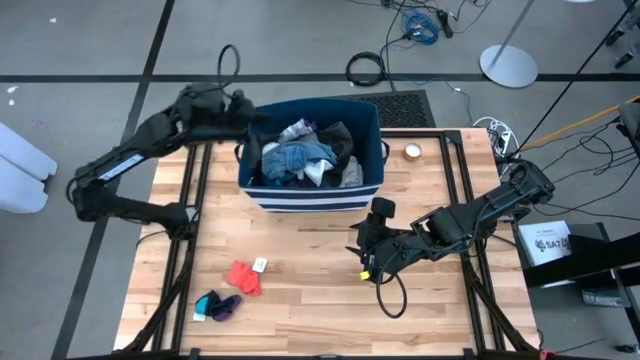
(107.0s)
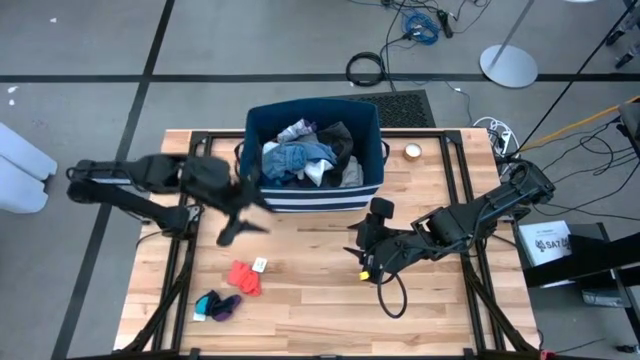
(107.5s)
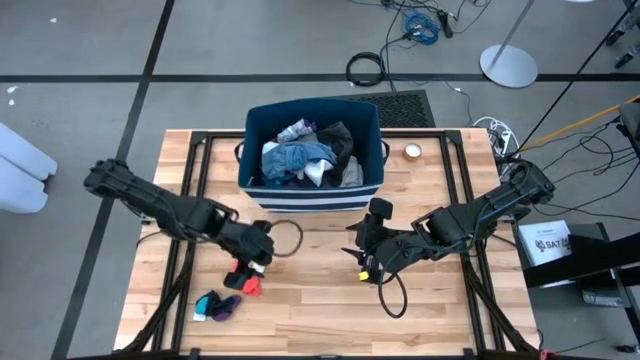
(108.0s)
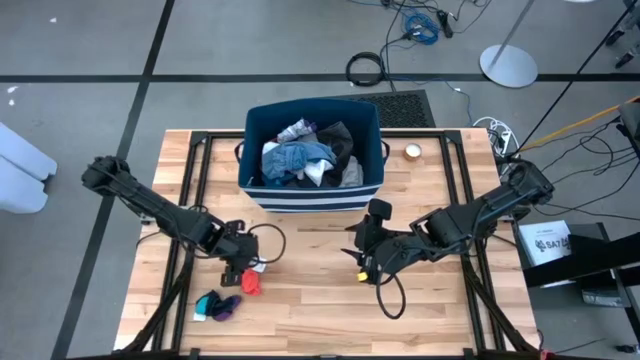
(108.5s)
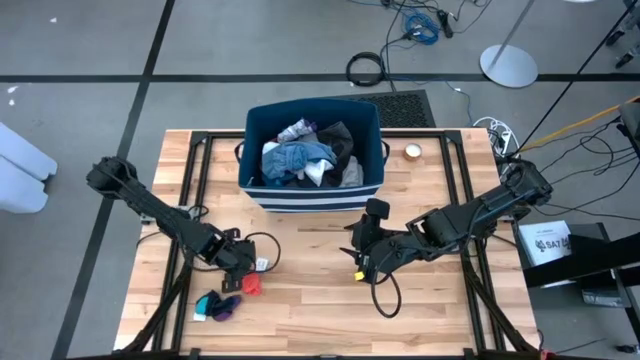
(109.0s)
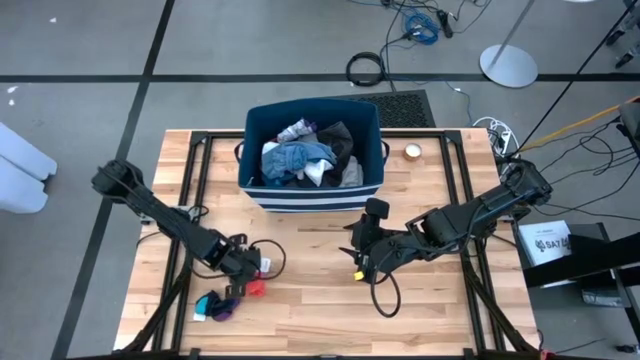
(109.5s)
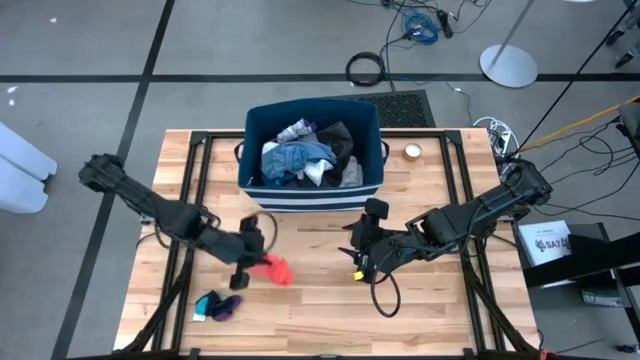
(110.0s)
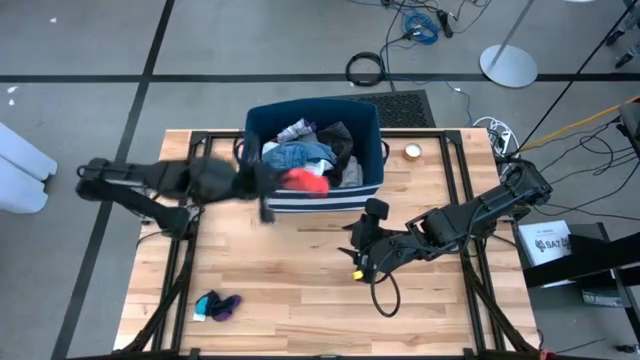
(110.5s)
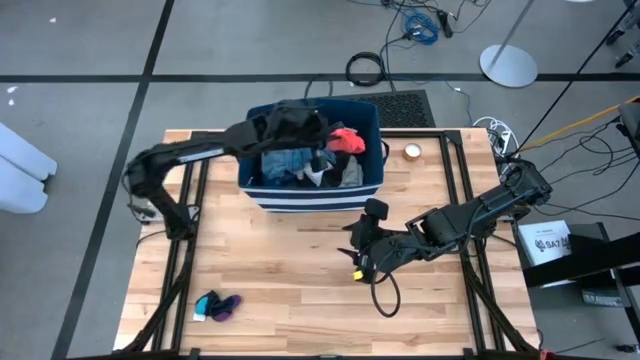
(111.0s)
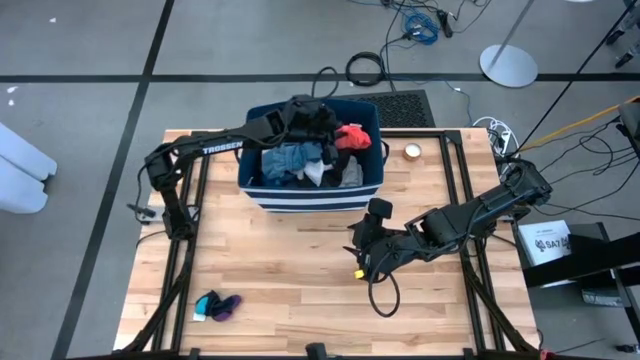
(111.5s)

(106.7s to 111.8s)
Task: Sort clothes
Put the orange sock into the blue bin

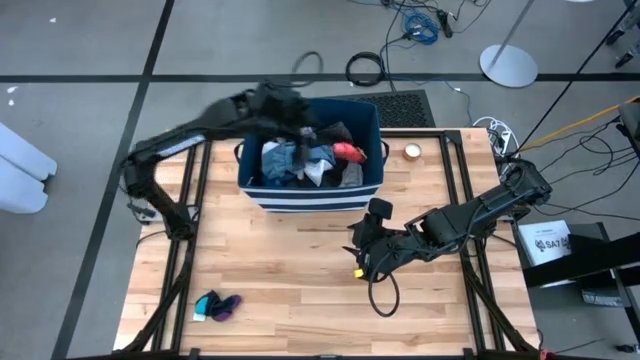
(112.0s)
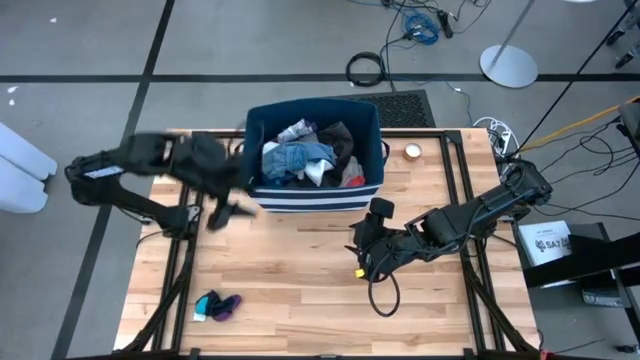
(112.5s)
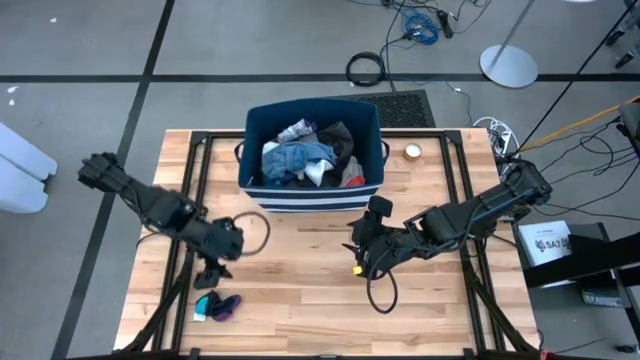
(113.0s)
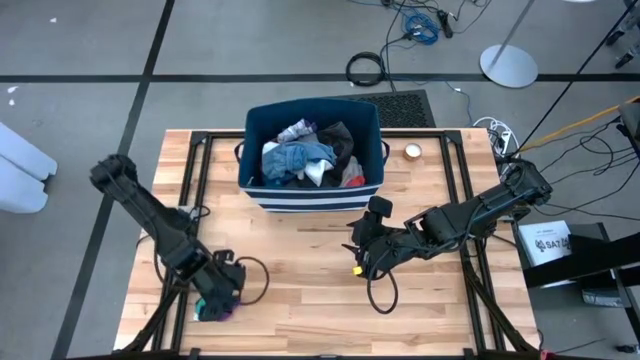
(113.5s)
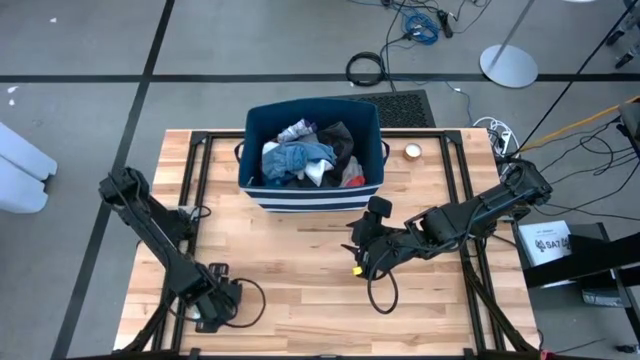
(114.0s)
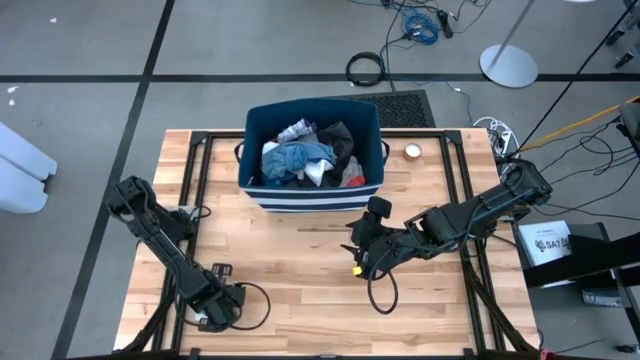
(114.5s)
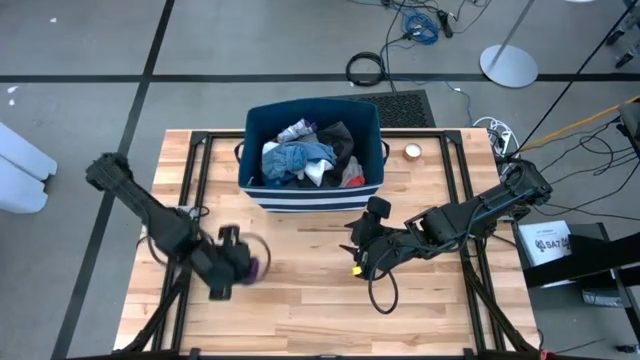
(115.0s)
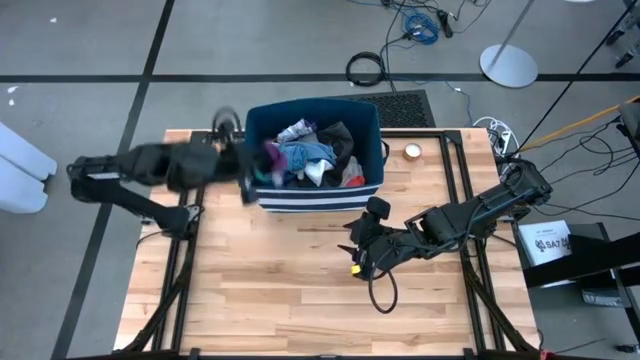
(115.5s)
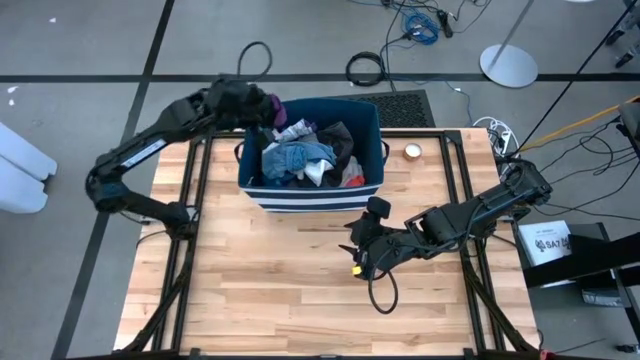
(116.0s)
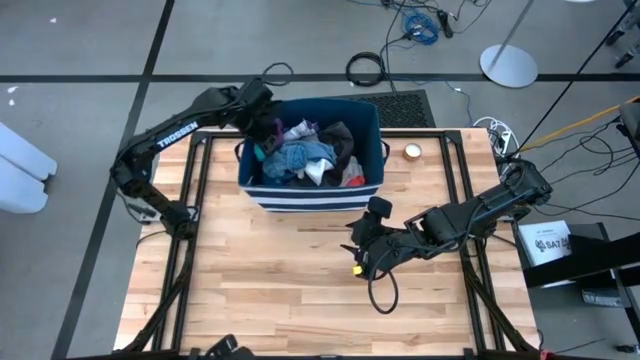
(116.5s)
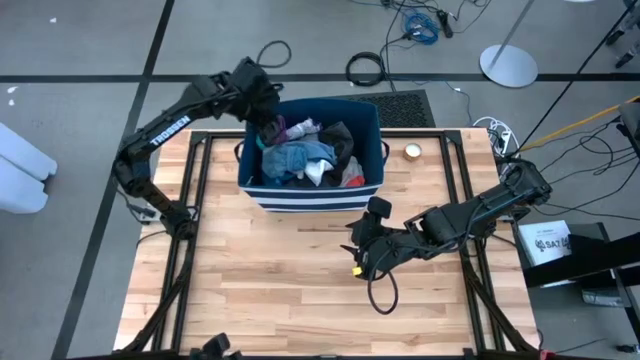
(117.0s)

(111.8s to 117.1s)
Put the black sock into the blue bin

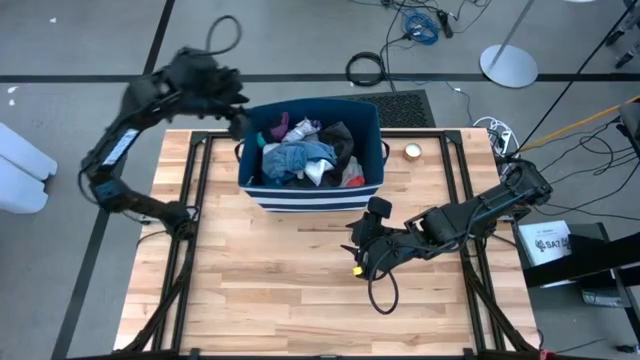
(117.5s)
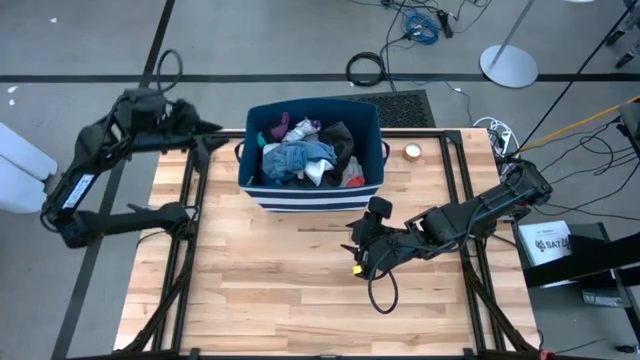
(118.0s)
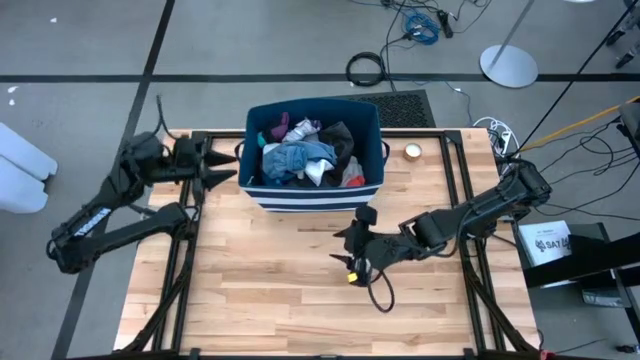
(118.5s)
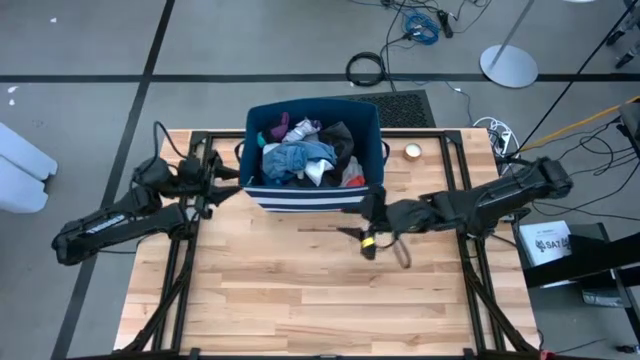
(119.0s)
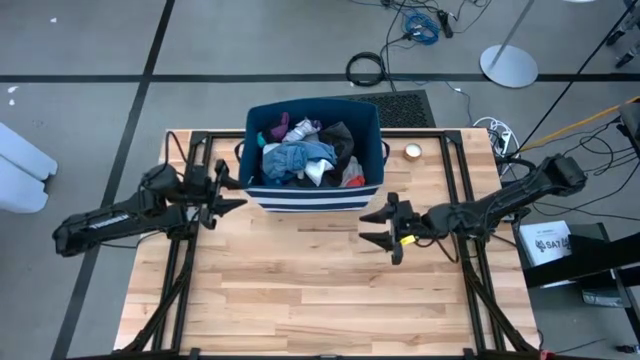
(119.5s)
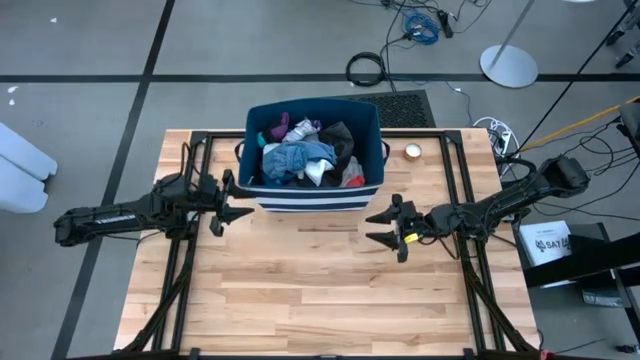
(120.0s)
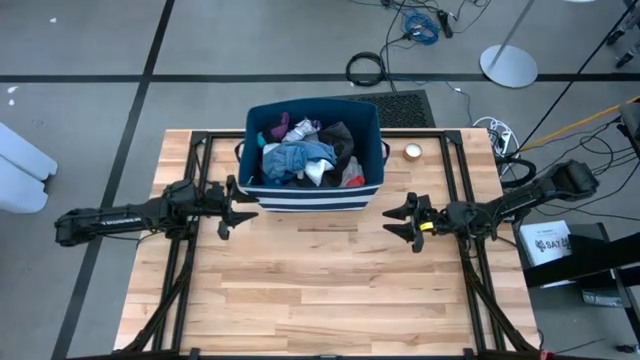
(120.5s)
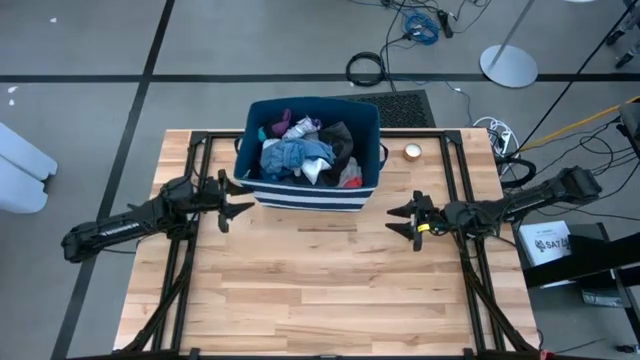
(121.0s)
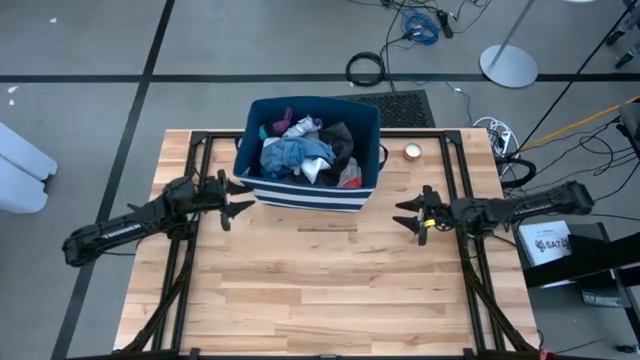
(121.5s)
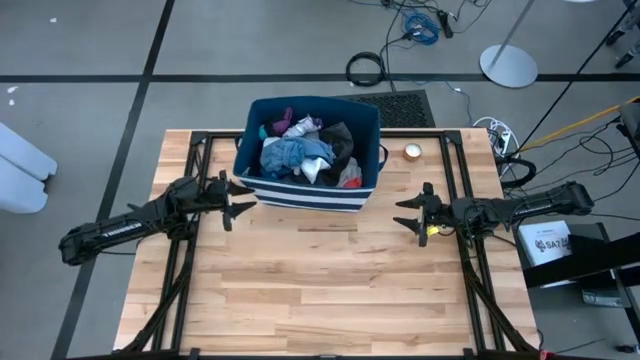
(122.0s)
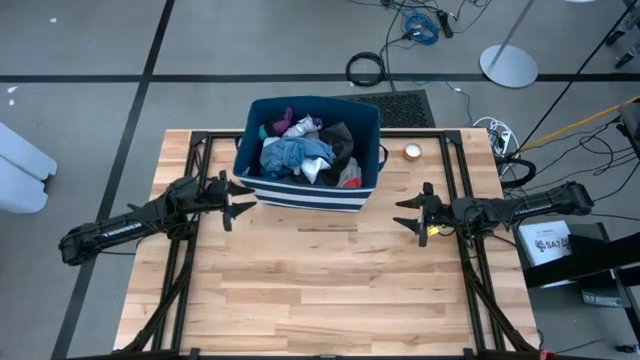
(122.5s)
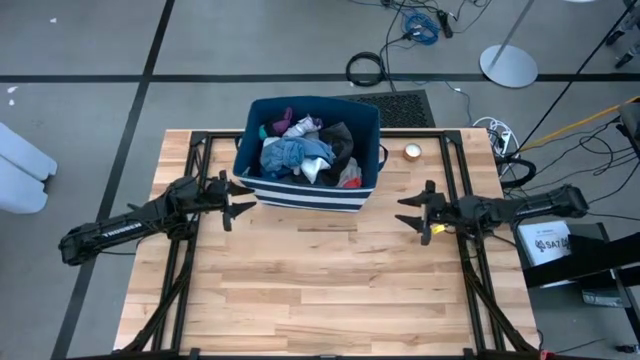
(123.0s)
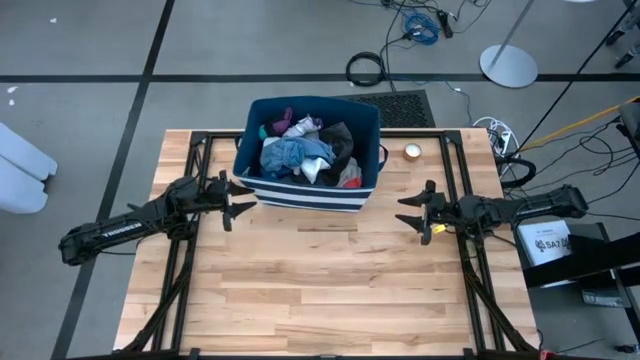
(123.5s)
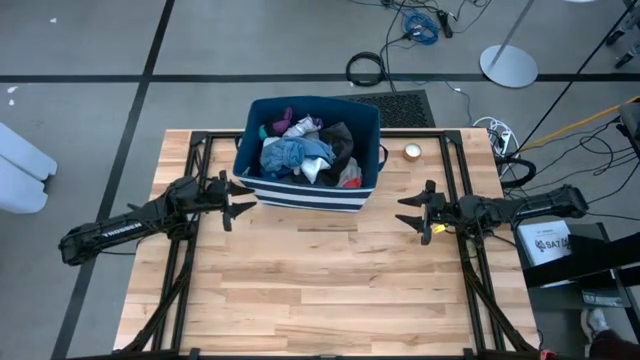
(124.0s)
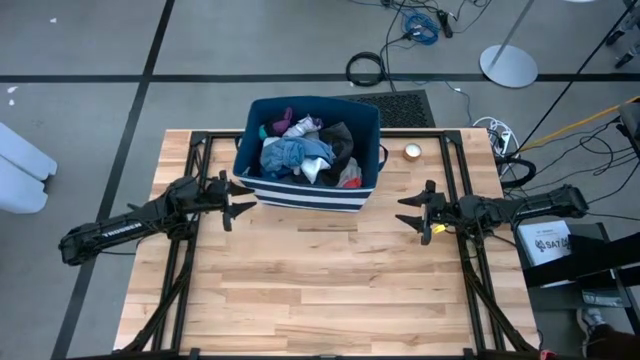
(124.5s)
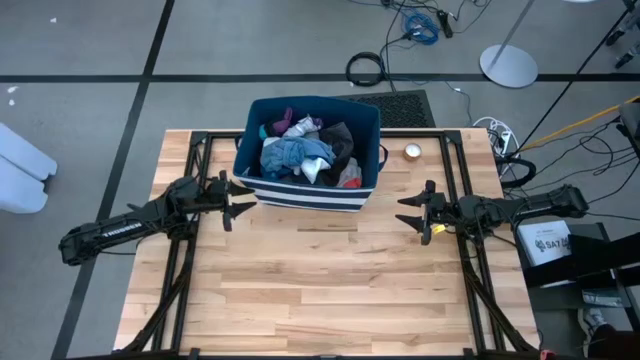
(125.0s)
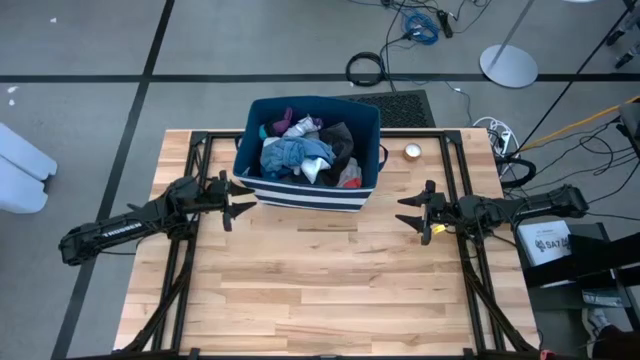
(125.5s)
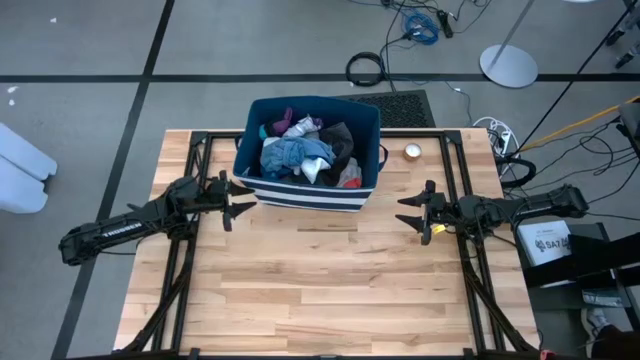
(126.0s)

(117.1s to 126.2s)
Return to Home Position

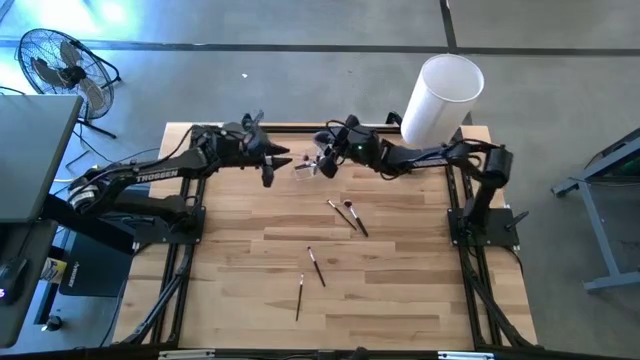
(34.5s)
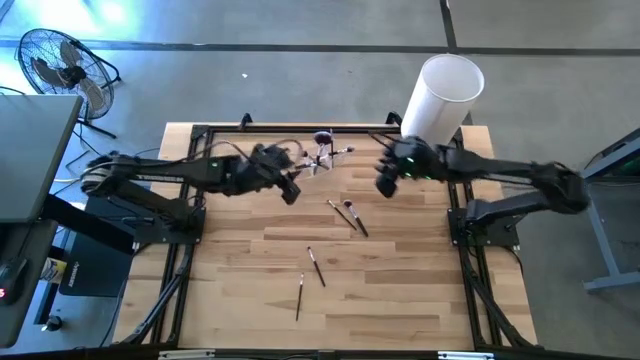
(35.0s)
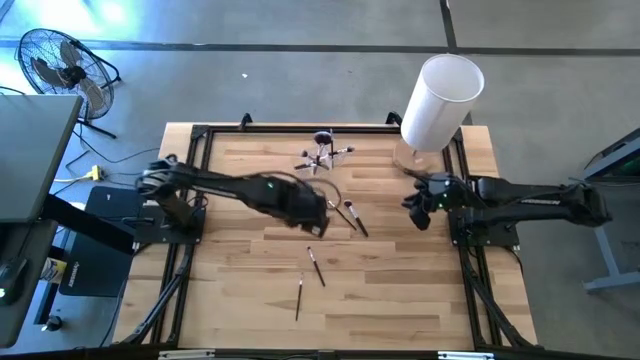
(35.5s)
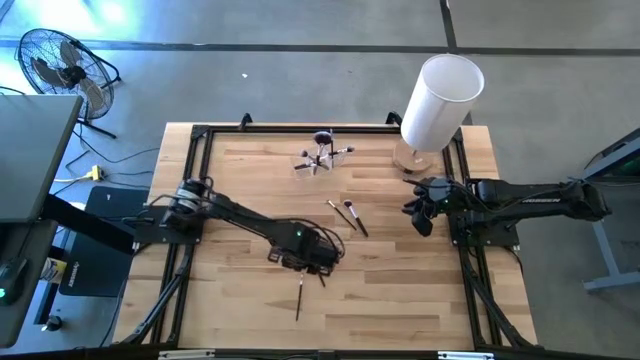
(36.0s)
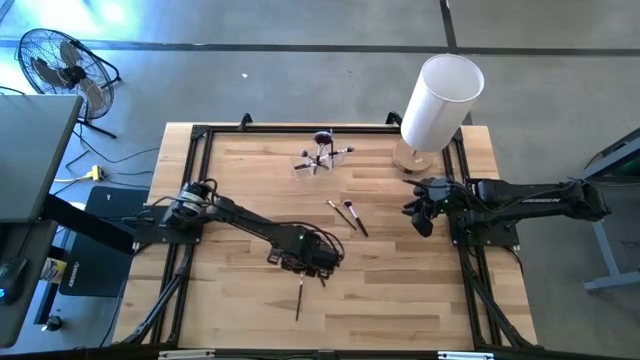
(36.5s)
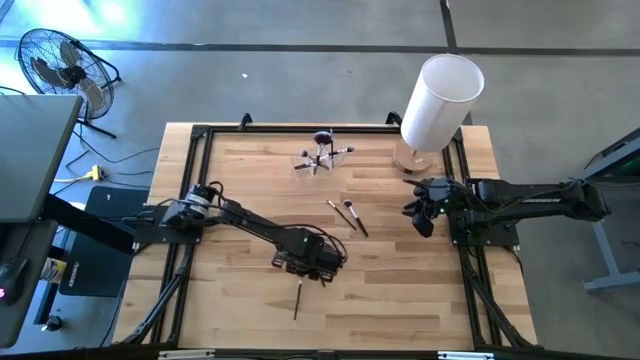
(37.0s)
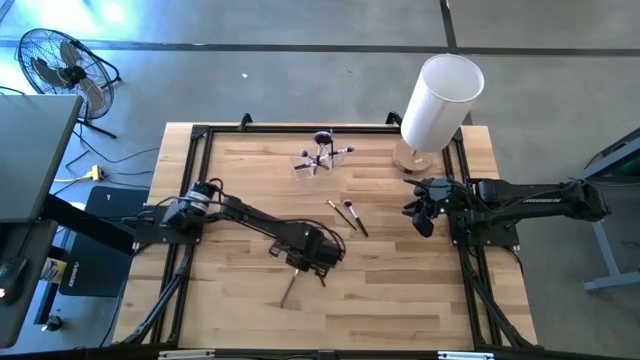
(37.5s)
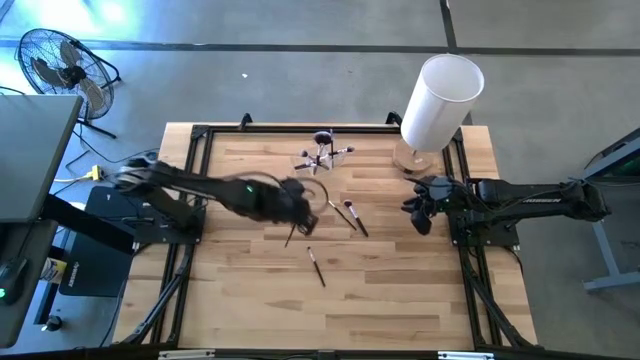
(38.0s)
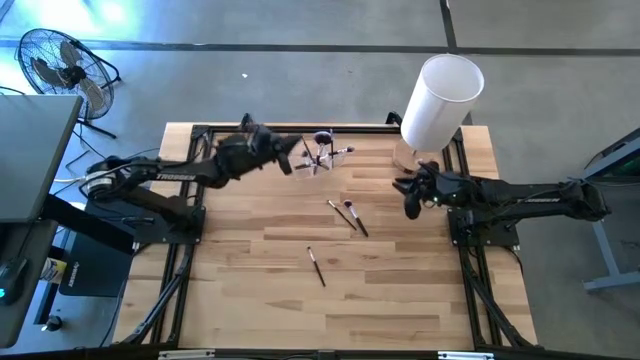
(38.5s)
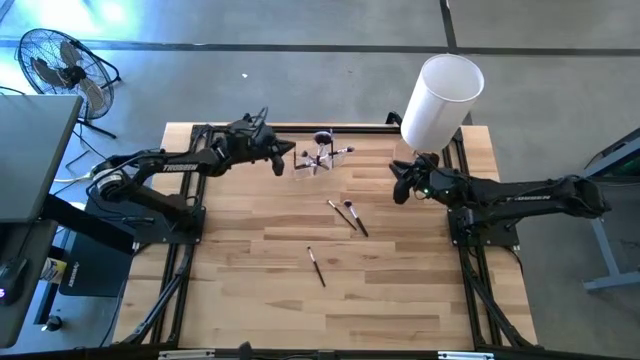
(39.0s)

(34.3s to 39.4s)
Task: Put items in baskets/containers
Put the black eyeshadow brush into the transparent organizer
